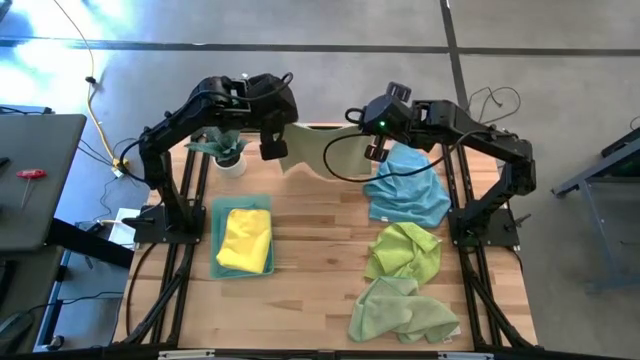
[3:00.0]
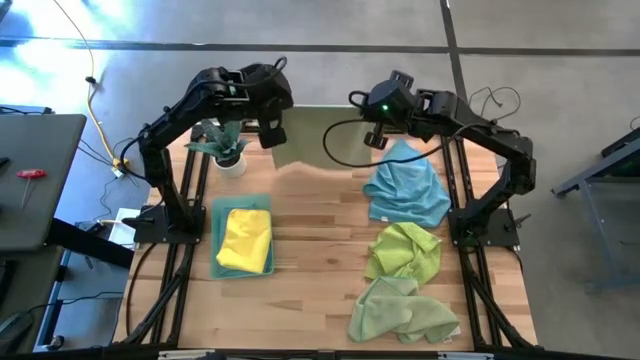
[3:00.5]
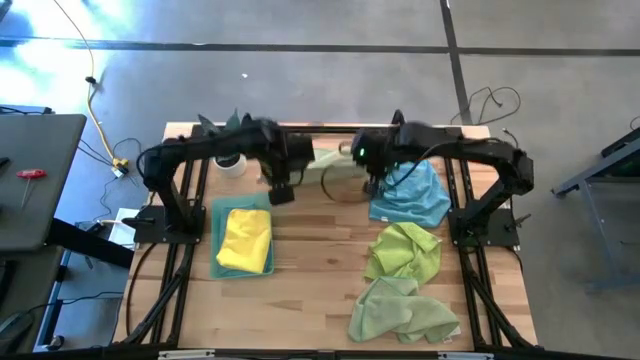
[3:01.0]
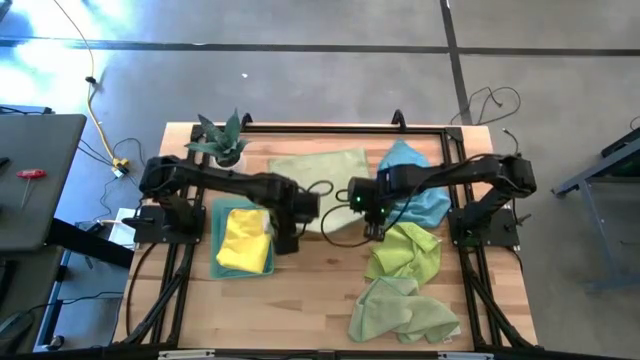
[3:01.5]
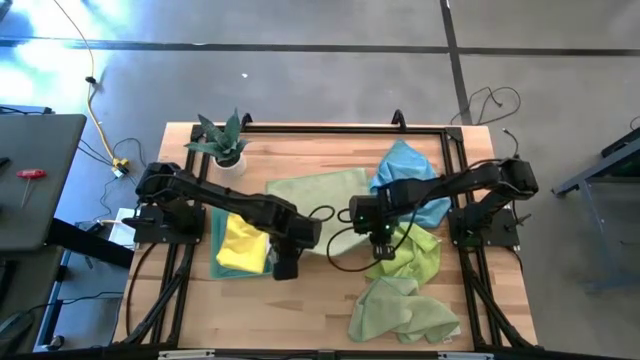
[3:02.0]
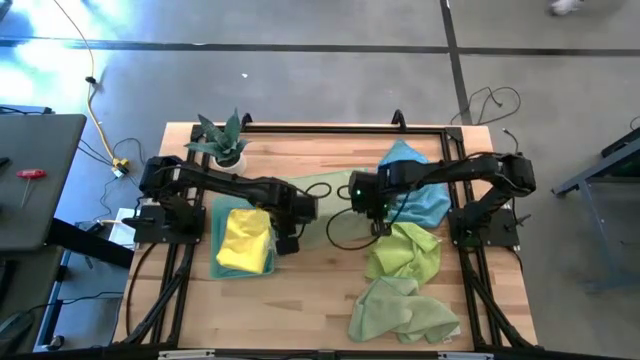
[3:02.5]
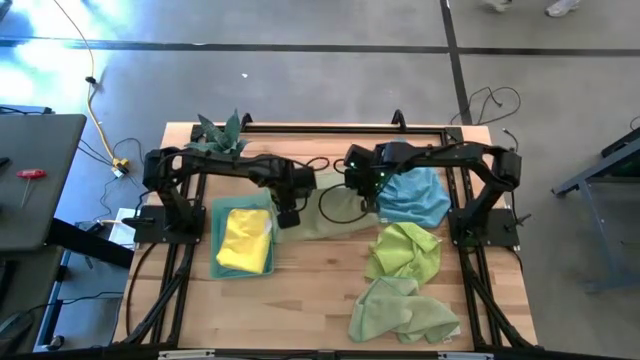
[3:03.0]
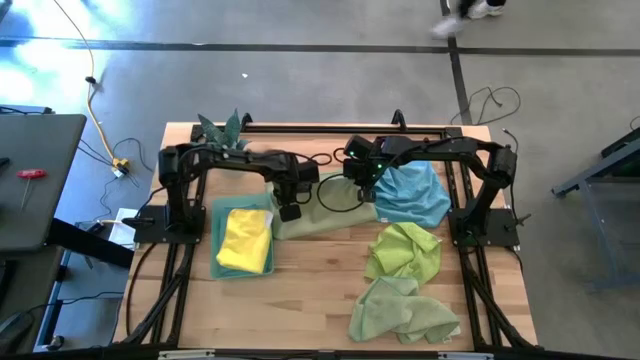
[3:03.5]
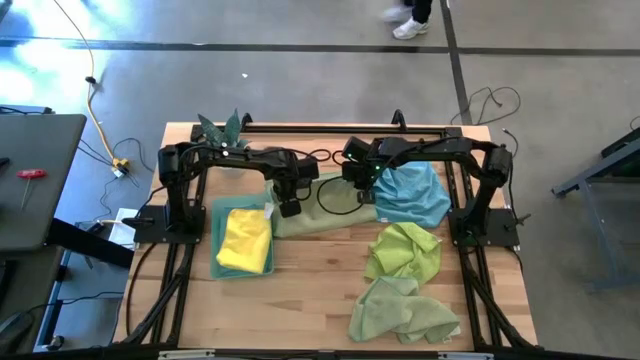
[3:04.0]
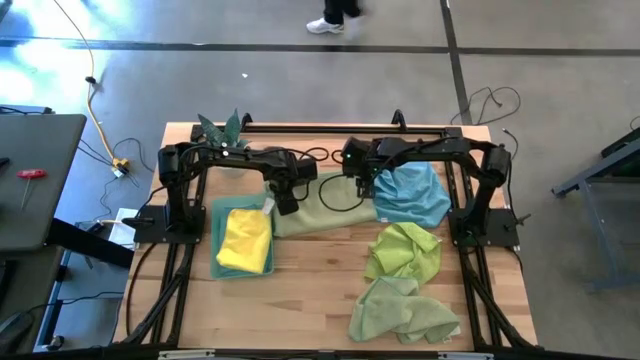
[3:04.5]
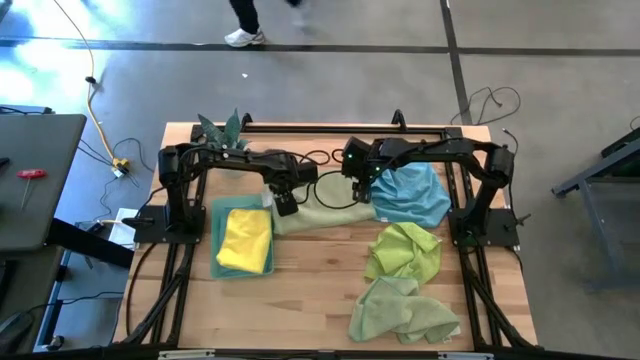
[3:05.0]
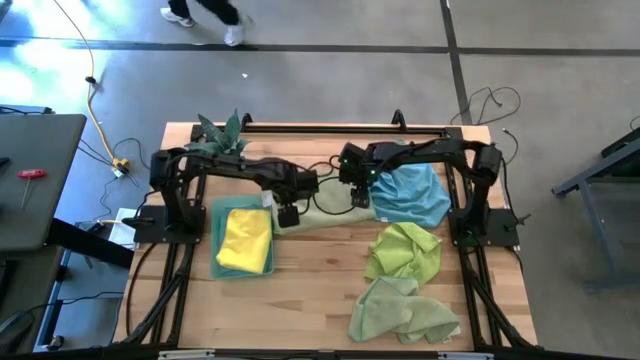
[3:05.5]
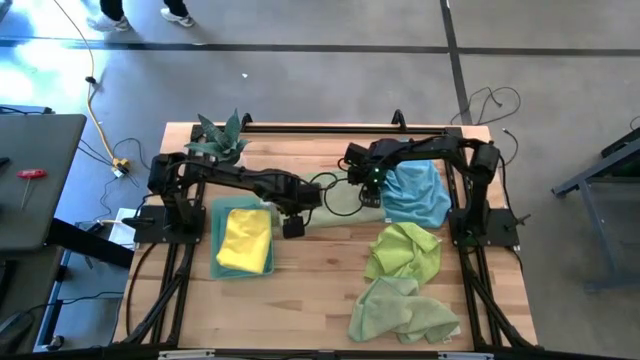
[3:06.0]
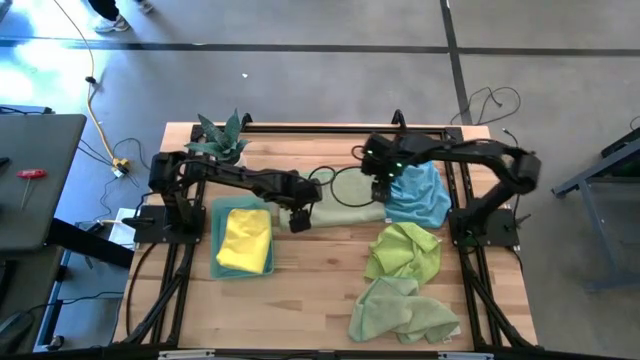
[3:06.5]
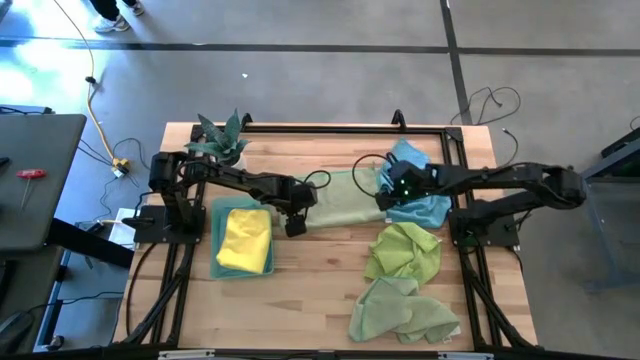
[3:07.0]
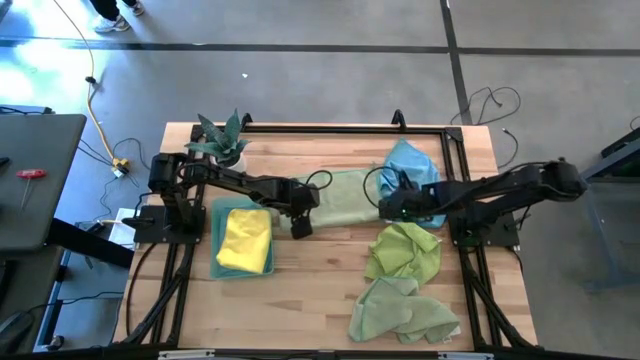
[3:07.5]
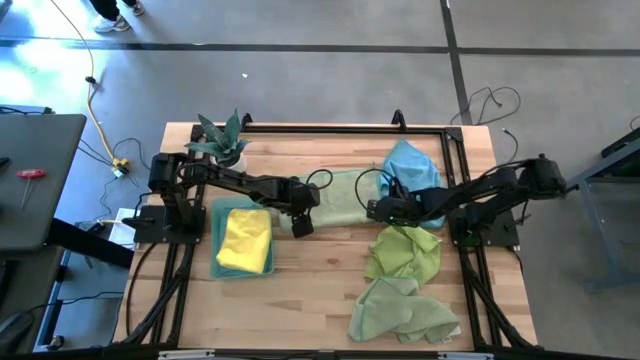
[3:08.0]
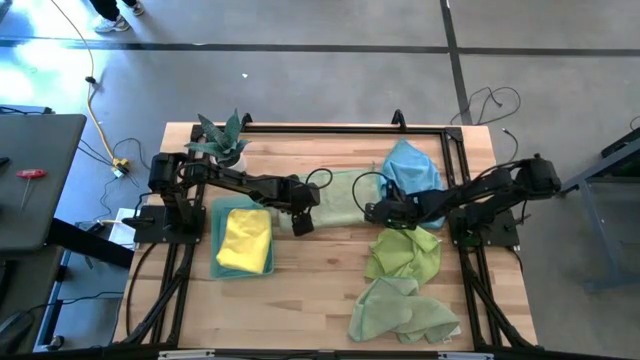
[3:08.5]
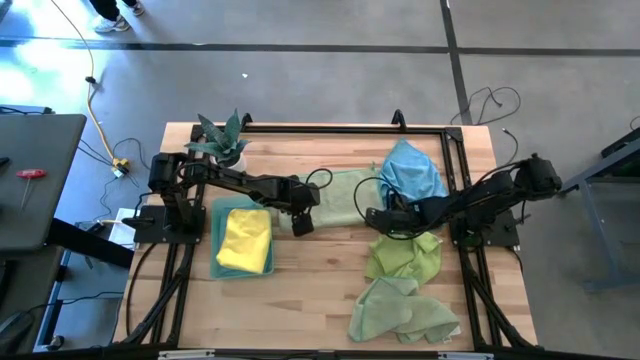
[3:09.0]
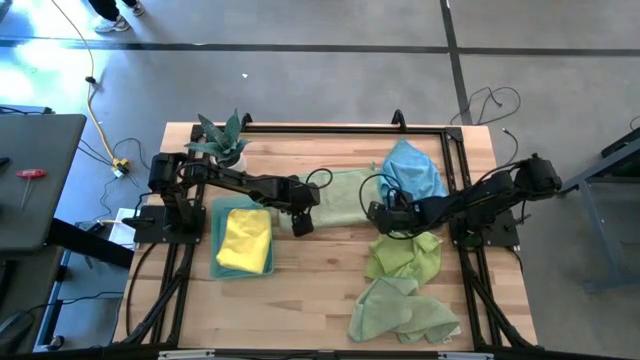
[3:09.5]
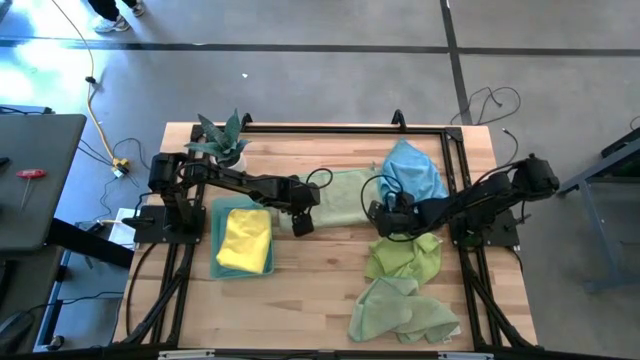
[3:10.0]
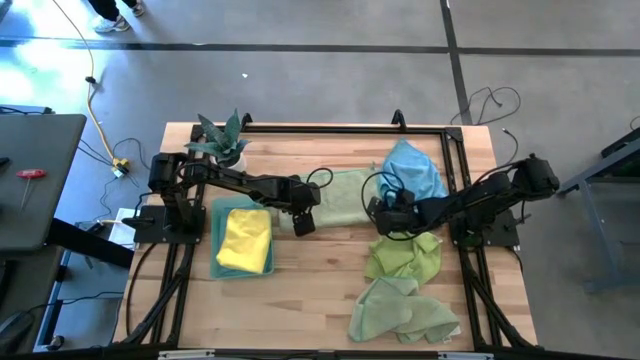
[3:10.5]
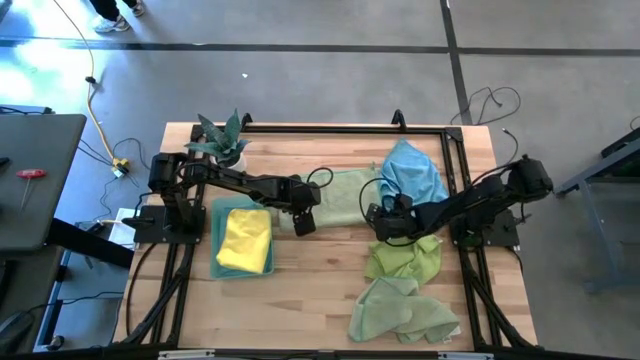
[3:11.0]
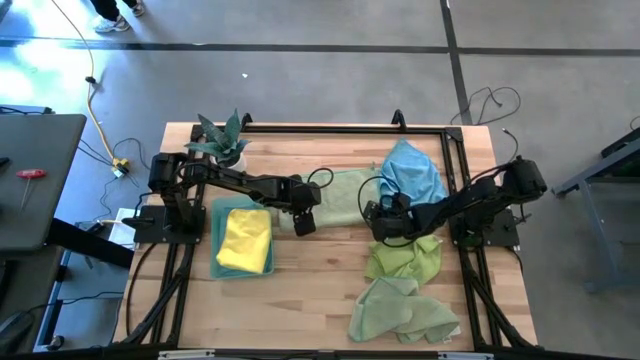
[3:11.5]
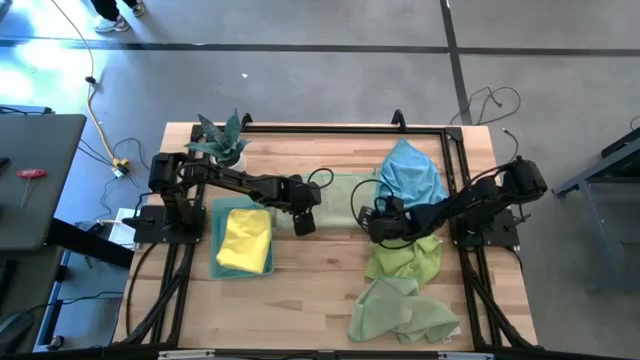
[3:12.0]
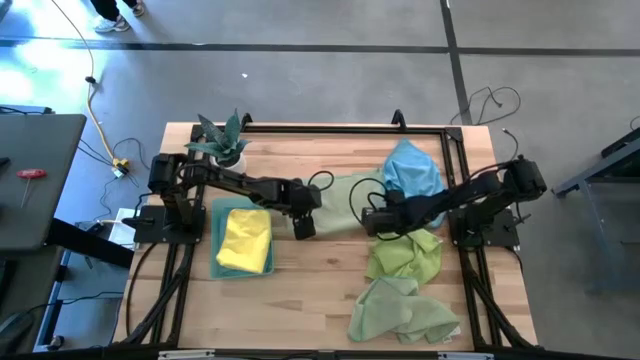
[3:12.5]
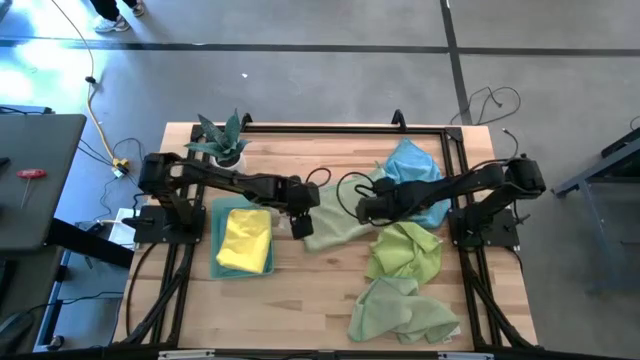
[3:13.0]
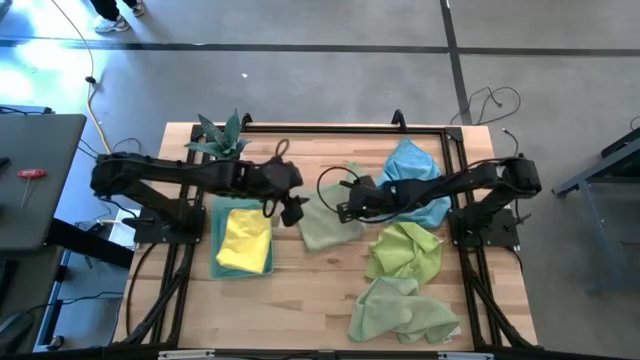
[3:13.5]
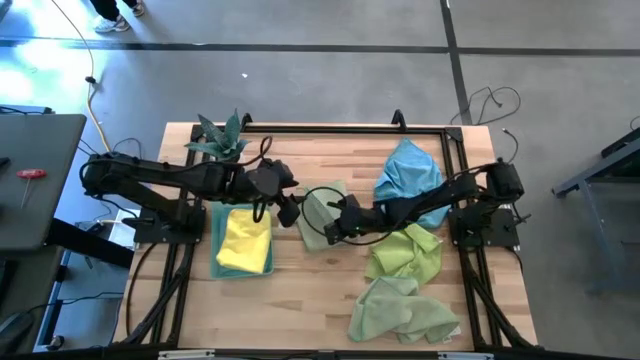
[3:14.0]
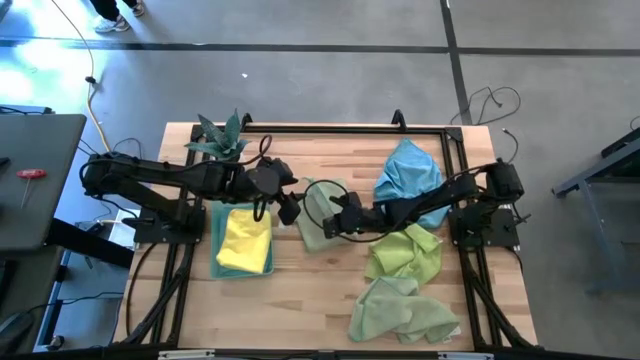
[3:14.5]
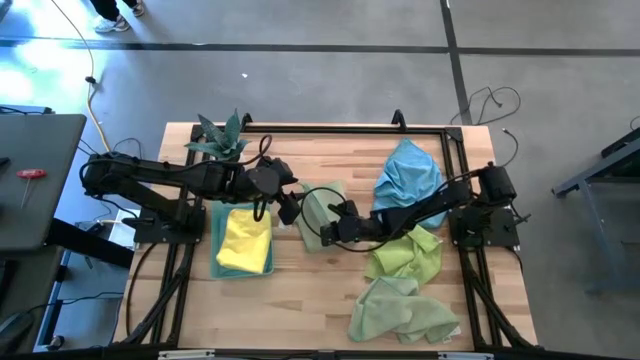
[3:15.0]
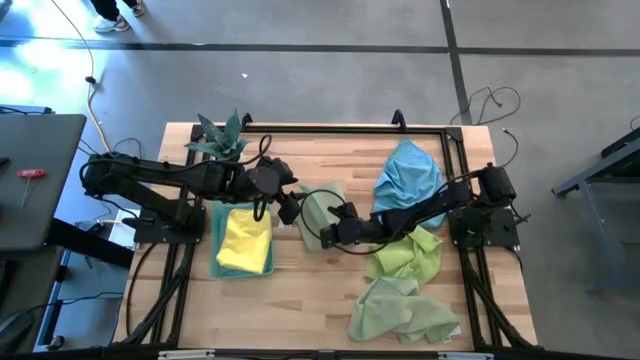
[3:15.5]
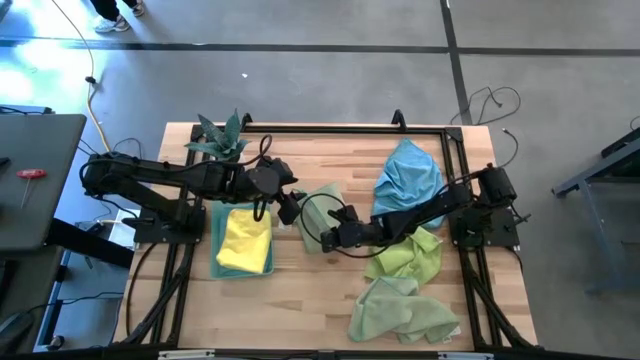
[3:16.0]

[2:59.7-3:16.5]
Task: Fold microfiber towels
Fold the top green microfiber towel

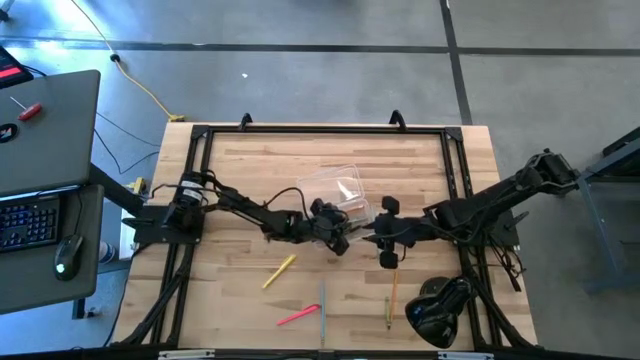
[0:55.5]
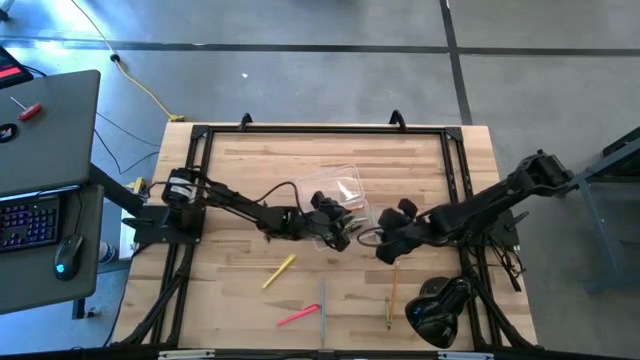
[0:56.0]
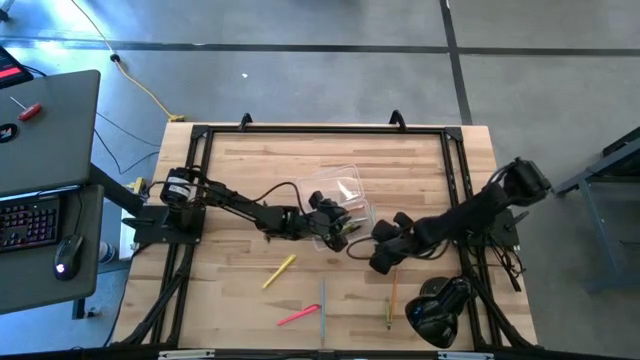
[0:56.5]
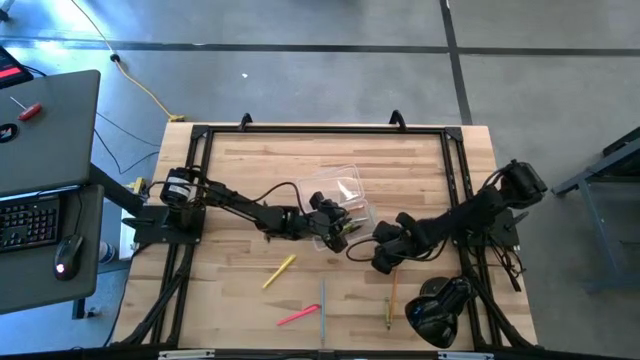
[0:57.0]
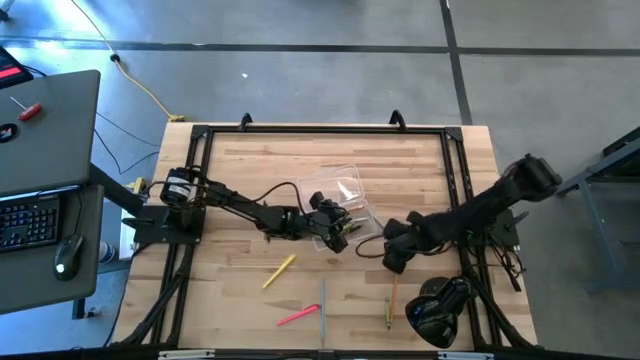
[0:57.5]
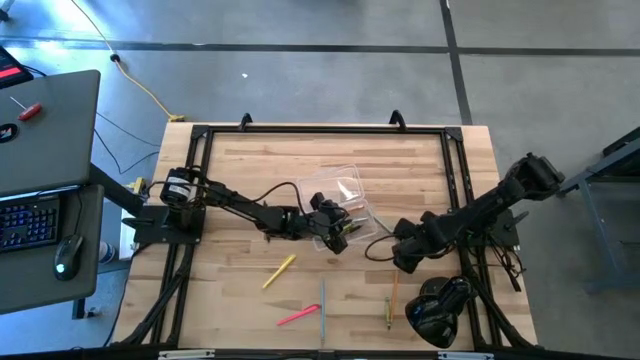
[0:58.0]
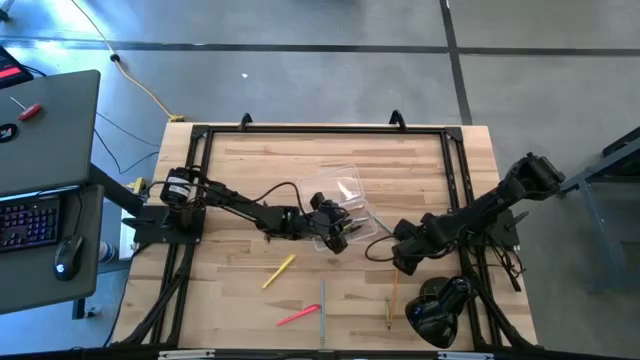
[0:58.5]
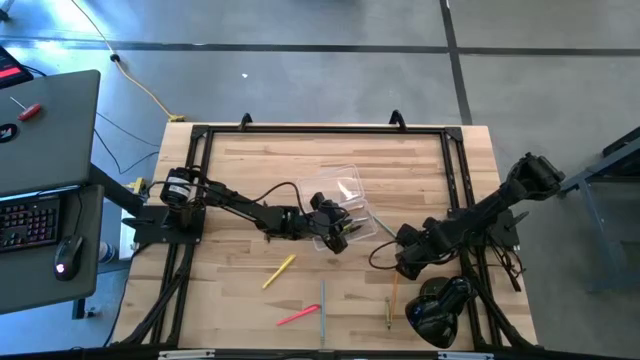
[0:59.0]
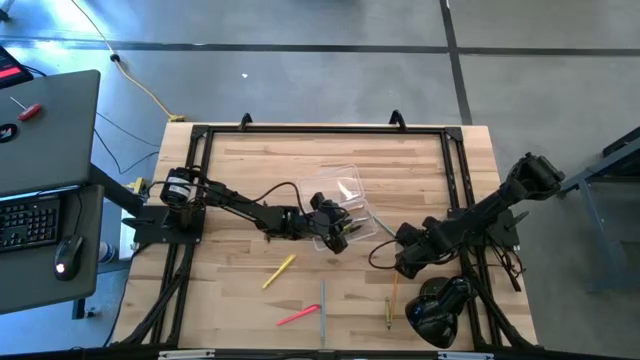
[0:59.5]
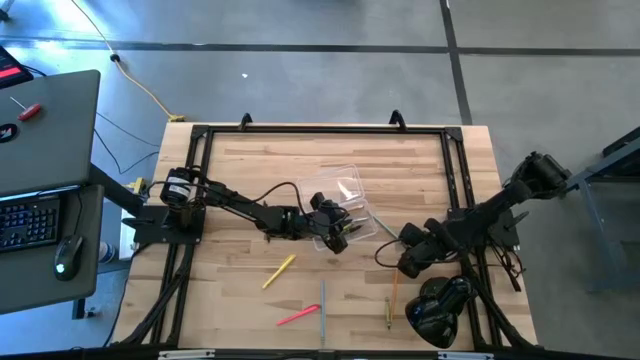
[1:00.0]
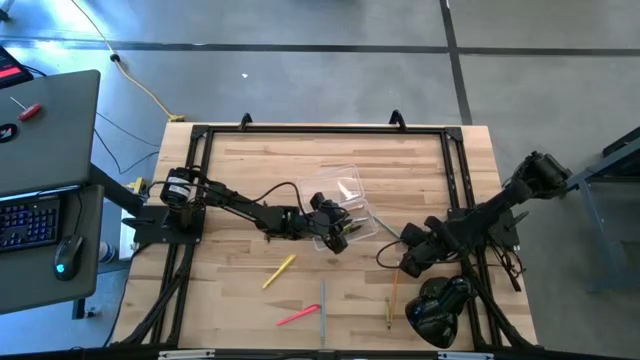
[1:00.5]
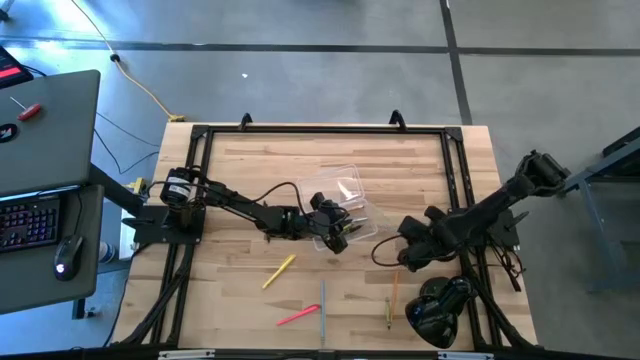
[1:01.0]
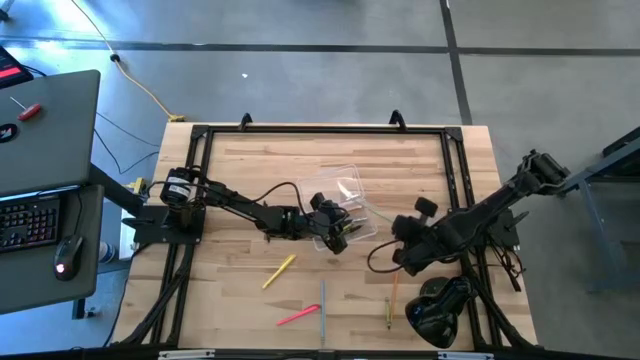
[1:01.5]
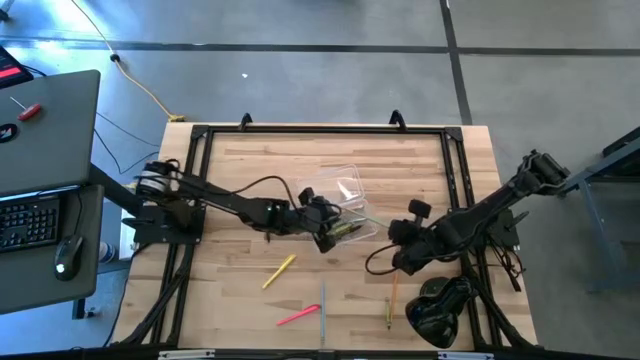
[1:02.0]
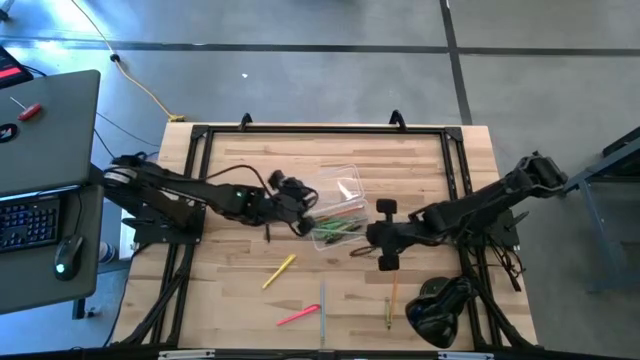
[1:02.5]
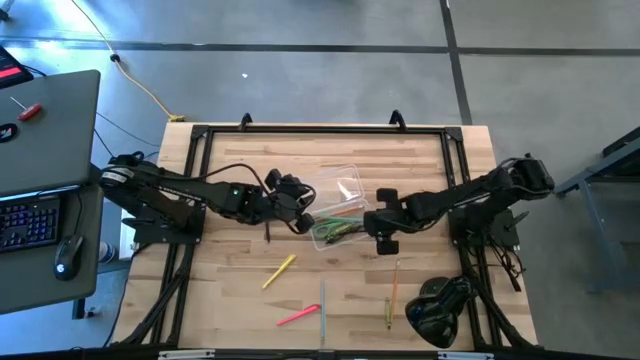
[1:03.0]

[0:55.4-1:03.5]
Task: Pick & place school supplies into a supply box
Put the blue pencil into the supply box
